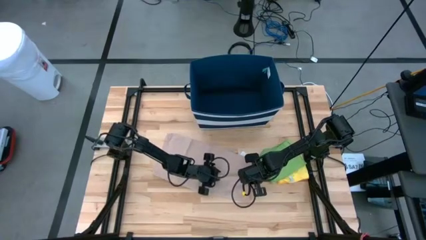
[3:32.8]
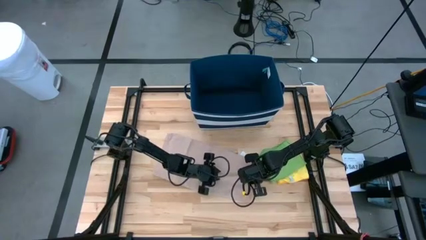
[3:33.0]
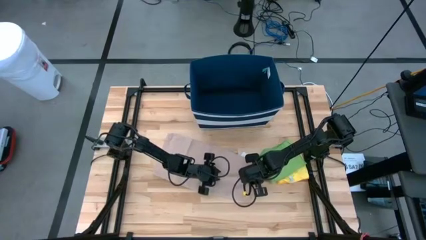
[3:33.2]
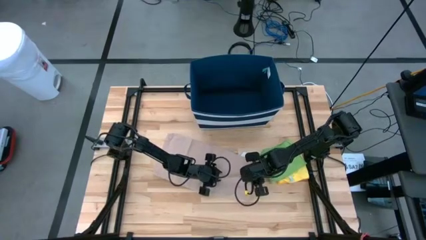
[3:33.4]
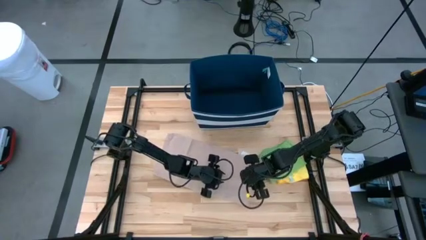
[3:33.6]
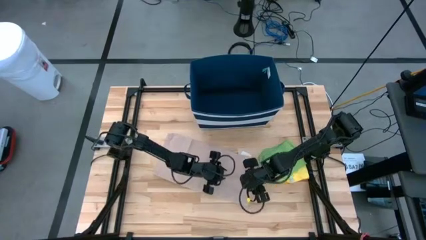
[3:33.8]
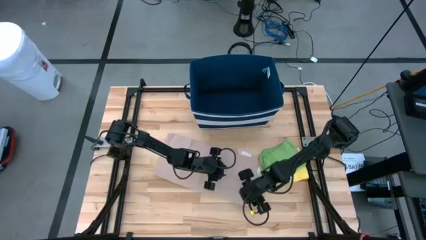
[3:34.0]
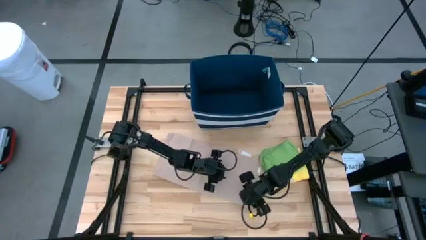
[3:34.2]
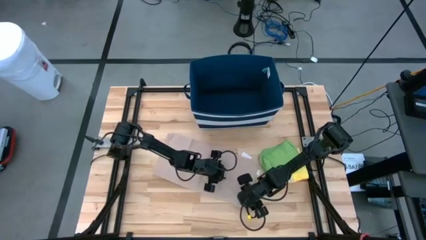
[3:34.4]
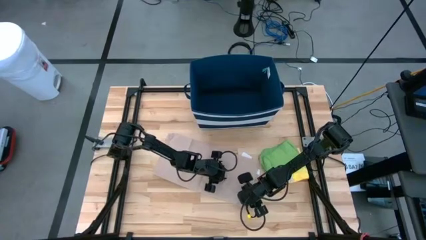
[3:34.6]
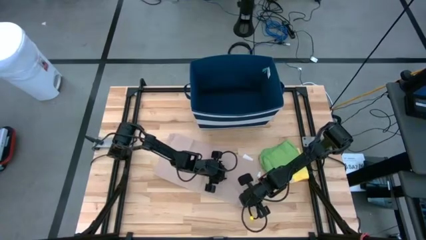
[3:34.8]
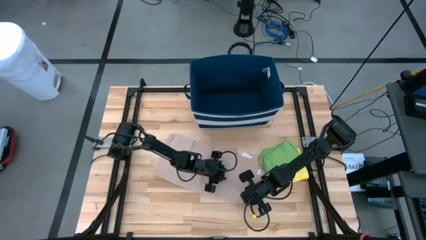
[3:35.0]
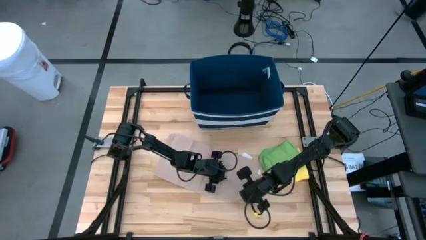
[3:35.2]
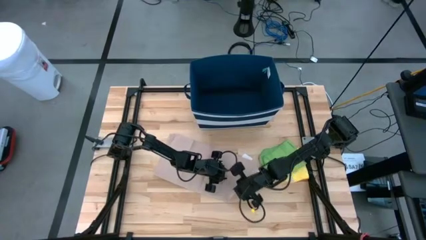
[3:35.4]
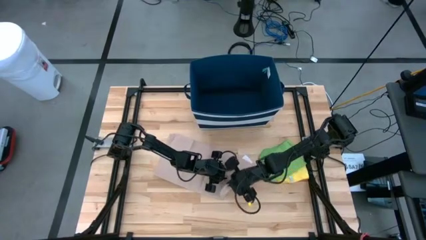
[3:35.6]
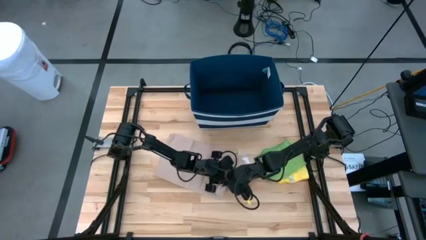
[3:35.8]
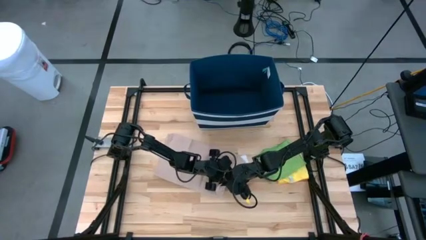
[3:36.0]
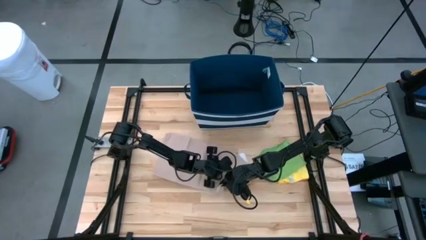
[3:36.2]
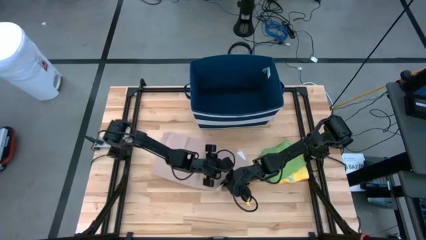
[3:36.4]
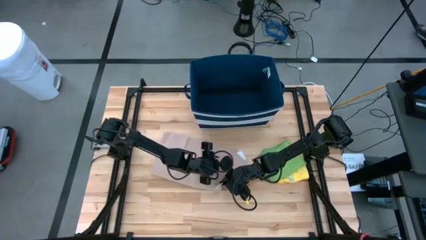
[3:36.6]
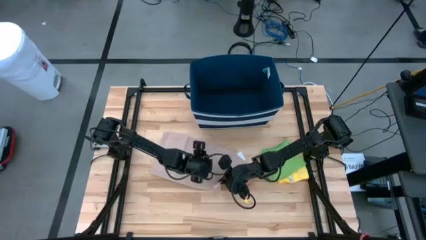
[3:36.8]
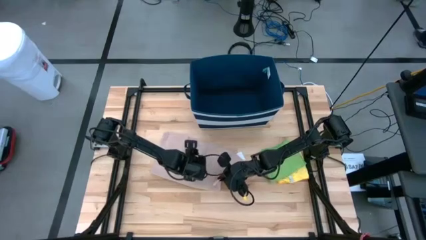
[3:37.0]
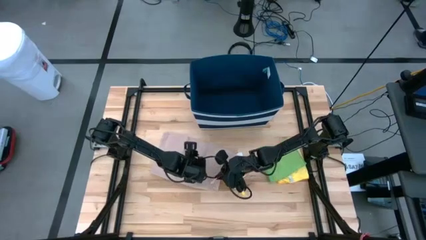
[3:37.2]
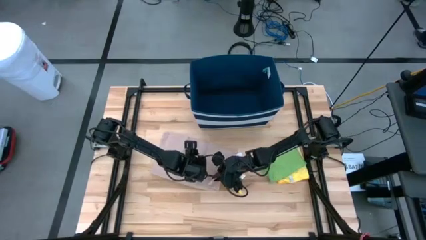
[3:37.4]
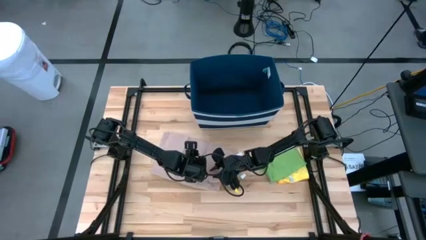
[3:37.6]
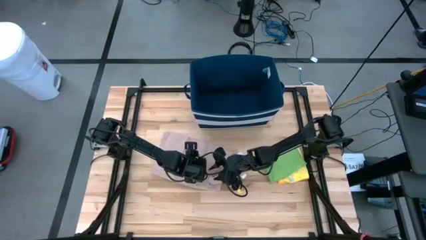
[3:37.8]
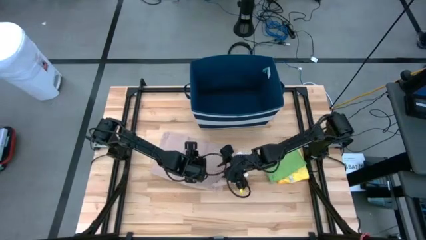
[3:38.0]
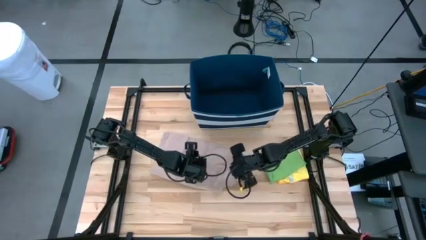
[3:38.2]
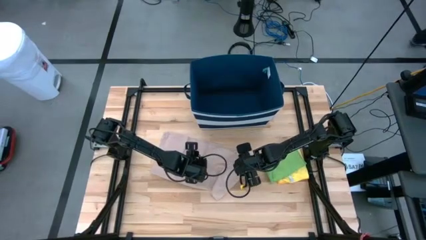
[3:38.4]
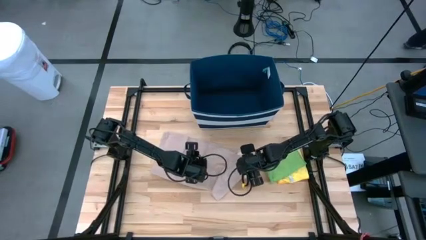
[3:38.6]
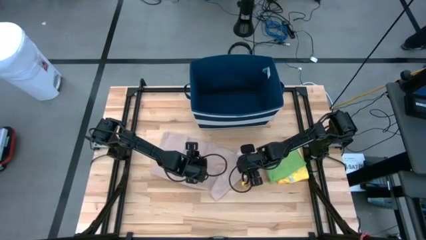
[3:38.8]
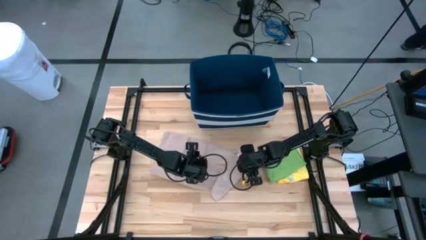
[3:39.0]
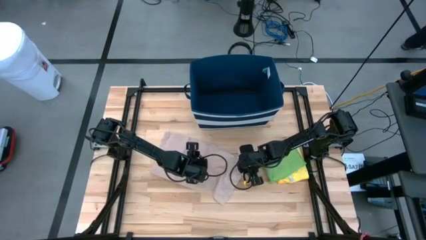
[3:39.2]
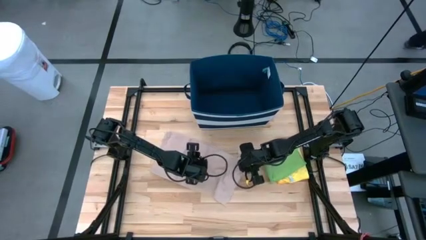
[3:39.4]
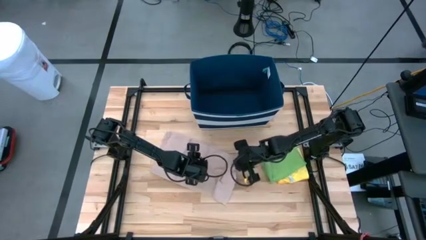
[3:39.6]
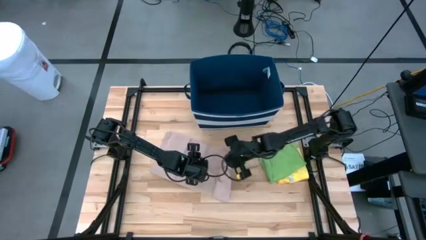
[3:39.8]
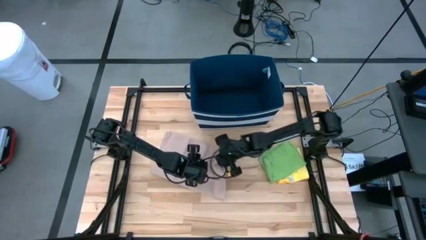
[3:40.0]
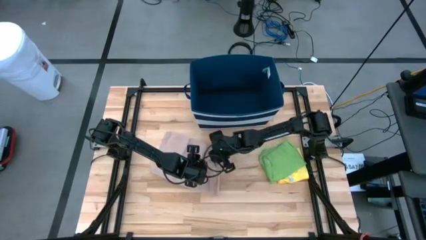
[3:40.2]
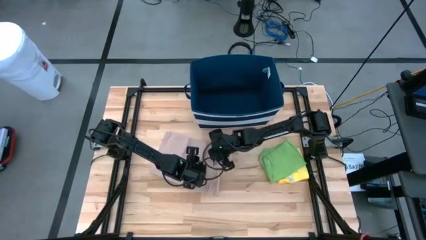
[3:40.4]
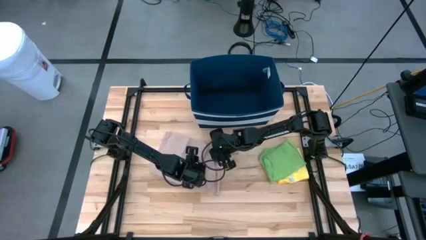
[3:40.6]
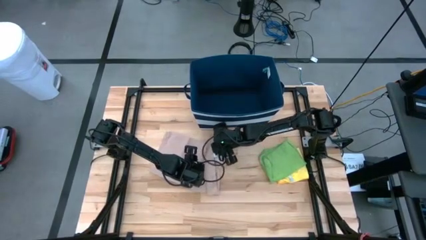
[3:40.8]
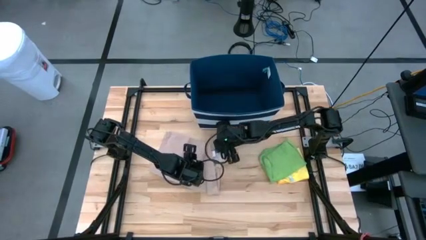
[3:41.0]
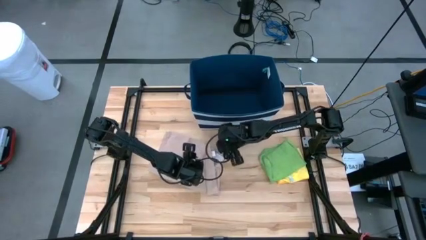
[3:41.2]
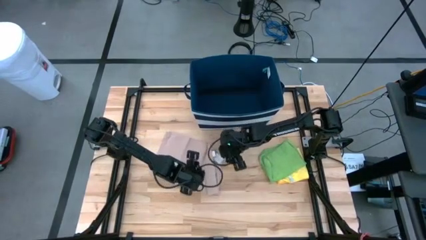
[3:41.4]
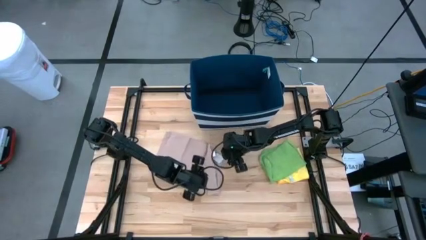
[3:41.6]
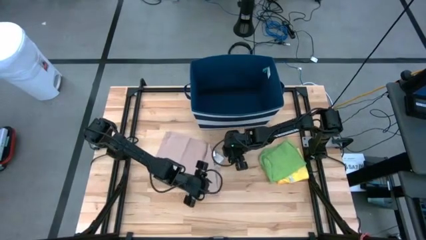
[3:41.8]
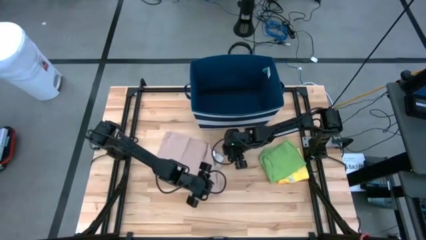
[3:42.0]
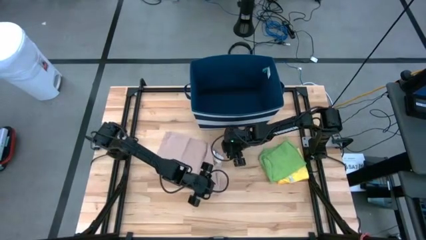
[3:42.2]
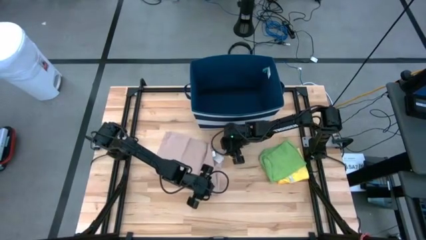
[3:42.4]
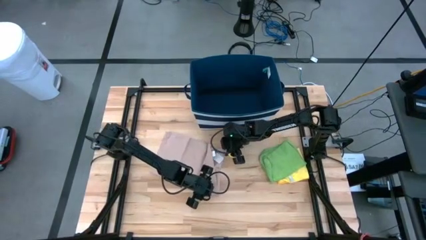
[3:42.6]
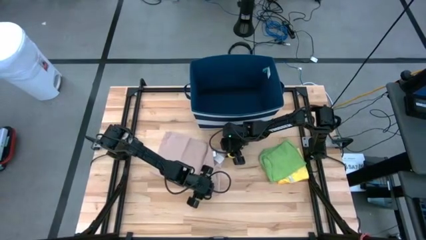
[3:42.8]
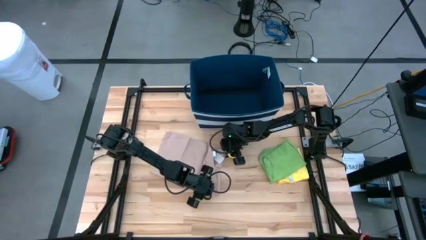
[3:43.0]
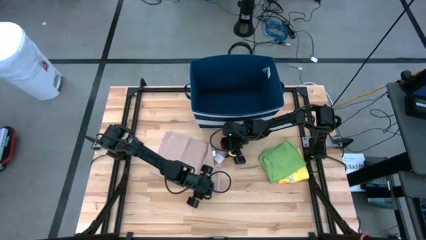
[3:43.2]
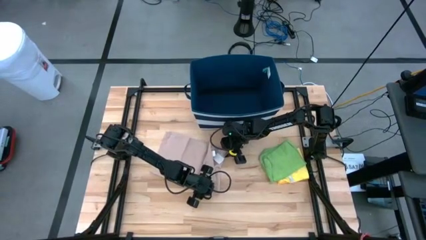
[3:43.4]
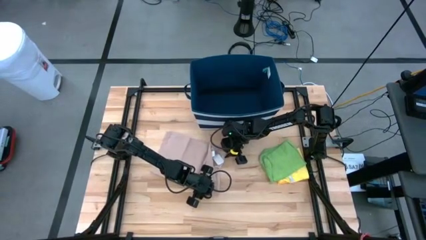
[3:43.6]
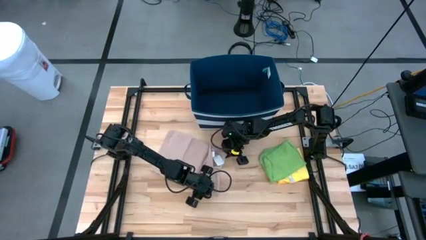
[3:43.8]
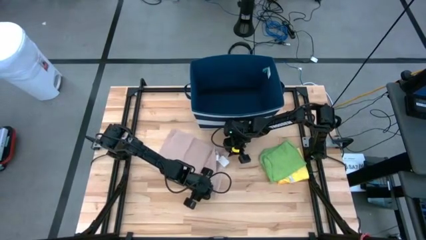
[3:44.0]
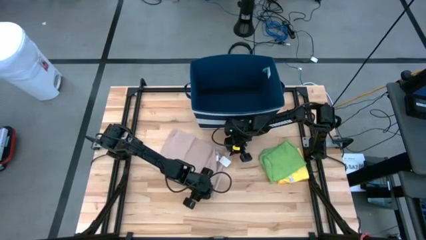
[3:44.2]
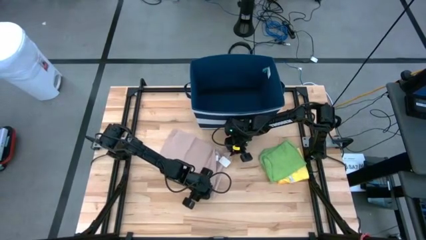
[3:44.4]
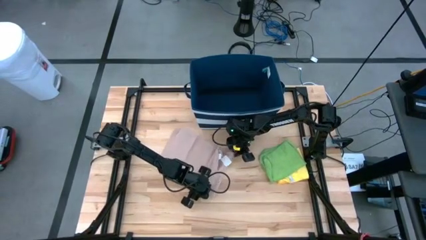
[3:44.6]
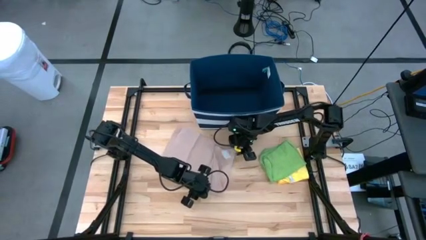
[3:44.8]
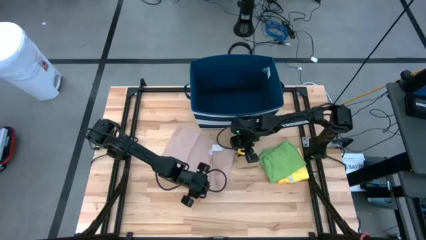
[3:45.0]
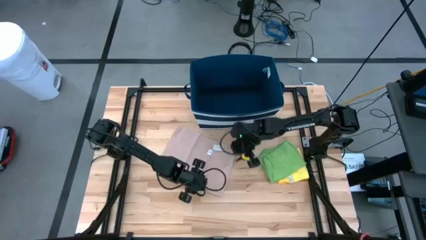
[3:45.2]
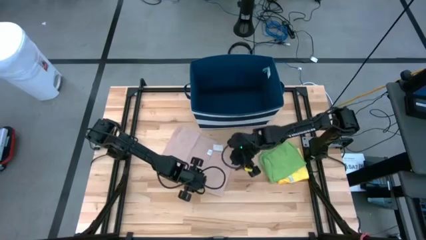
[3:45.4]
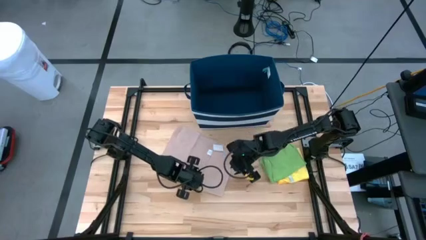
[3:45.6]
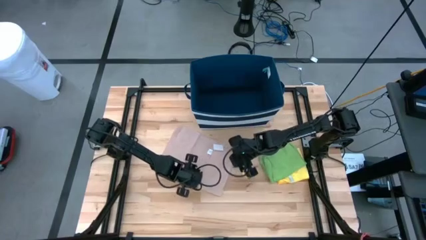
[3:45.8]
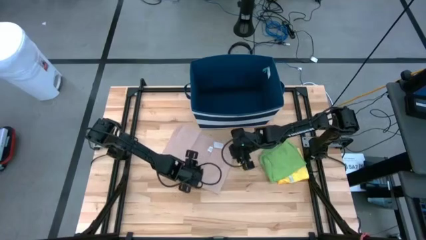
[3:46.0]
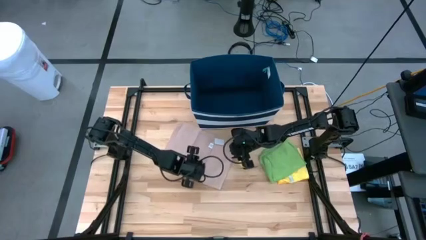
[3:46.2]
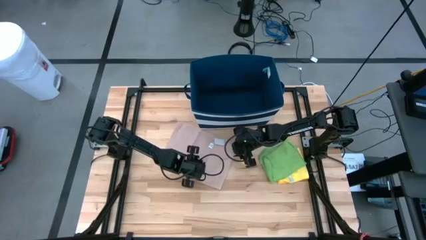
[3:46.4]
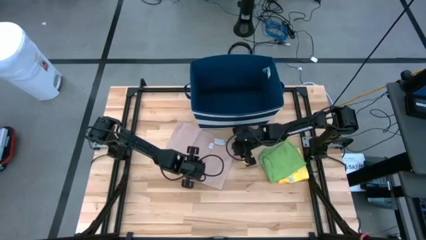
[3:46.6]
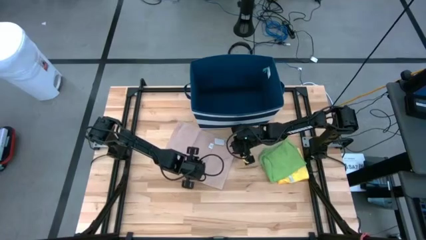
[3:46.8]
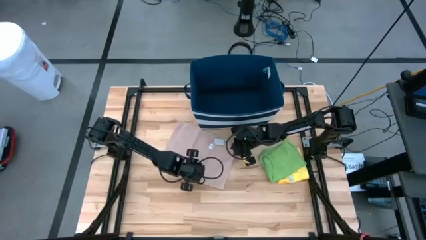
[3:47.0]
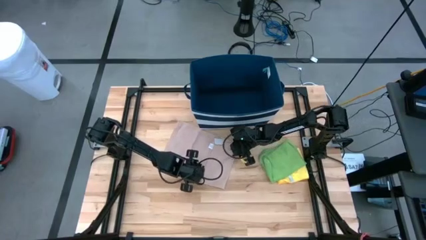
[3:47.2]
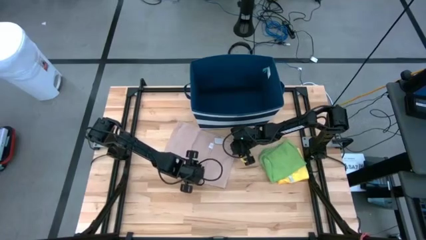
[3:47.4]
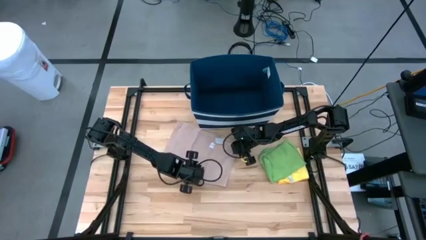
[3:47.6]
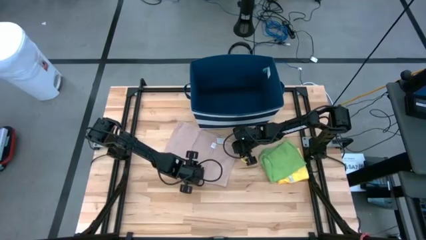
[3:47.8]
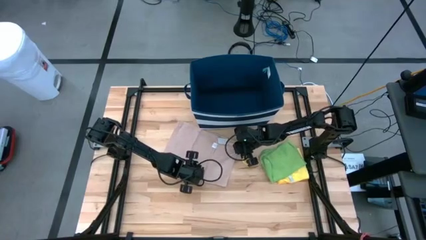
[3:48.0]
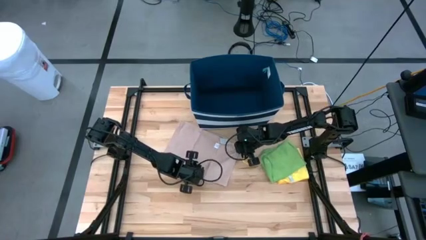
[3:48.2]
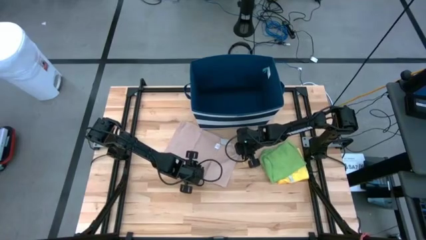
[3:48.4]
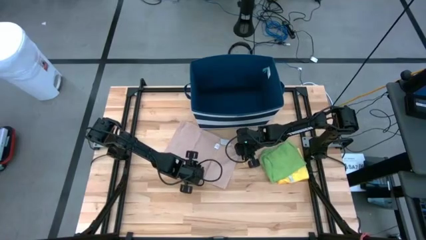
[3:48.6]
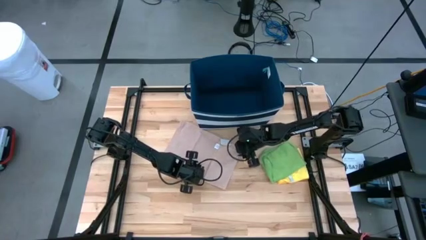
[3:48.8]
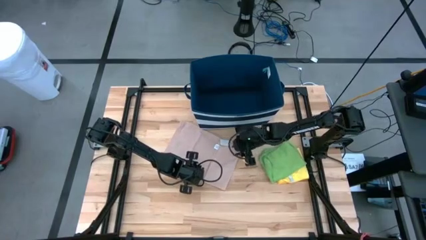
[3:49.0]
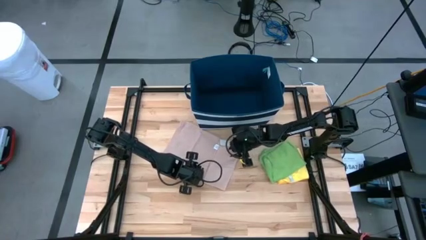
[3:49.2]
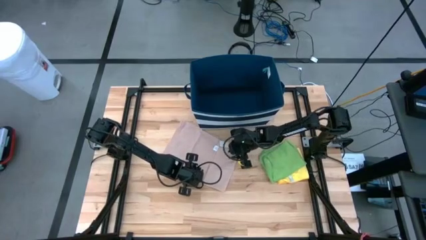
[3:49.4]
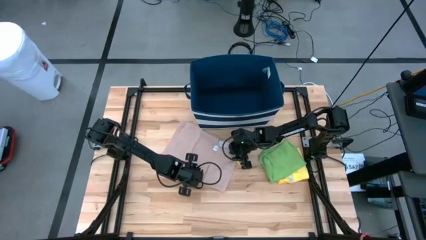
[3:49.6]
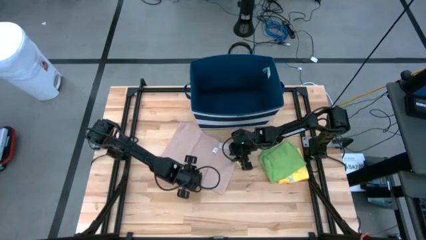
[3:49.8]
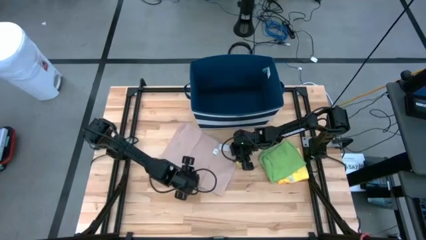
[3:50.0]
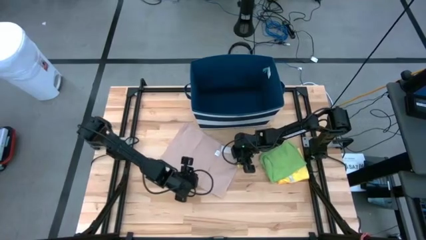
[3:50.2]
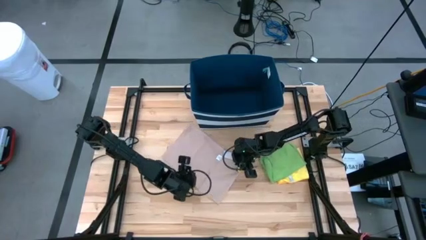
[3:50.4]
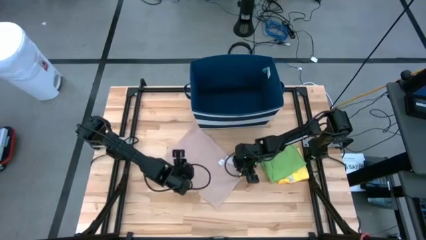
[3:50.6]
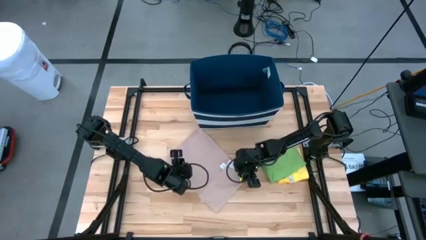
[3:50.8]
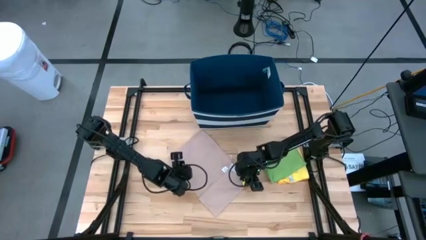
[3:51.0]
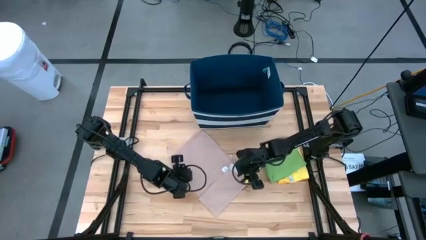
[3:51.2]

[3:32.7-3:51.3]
Task: Fold towel
Fold the light brown towel
